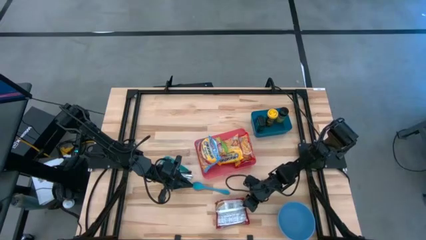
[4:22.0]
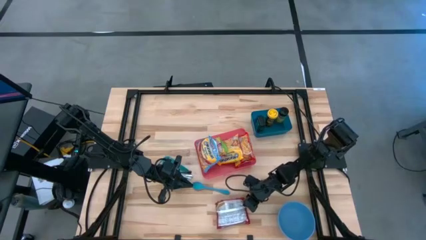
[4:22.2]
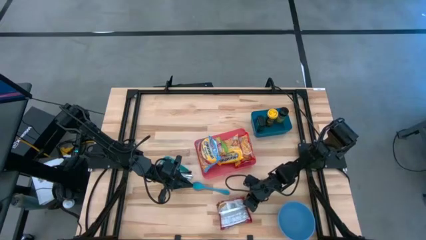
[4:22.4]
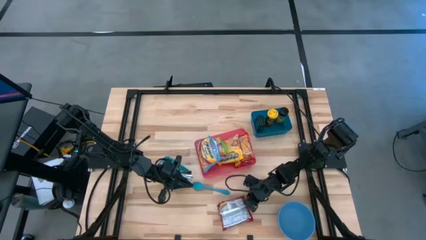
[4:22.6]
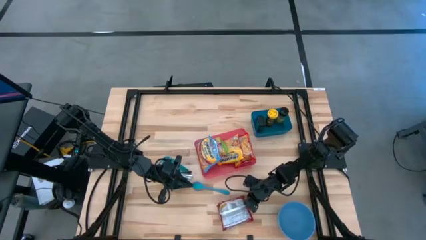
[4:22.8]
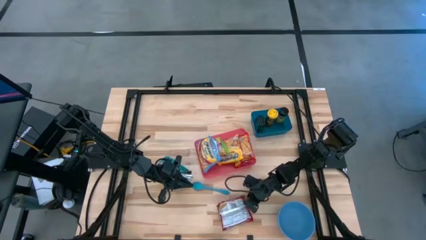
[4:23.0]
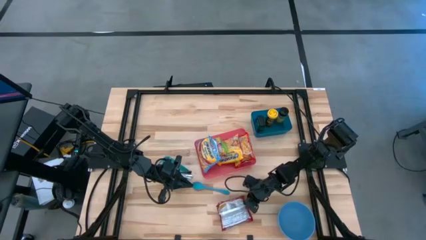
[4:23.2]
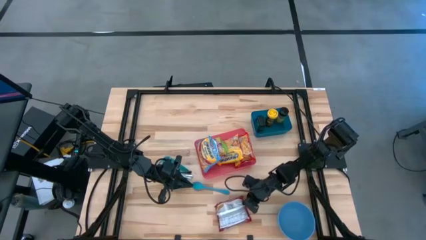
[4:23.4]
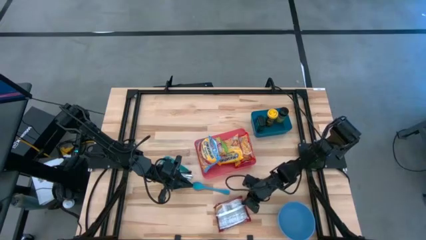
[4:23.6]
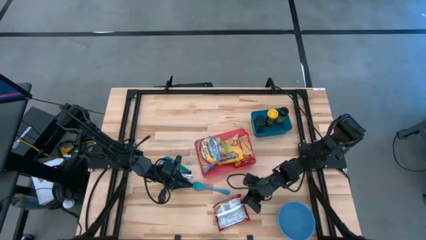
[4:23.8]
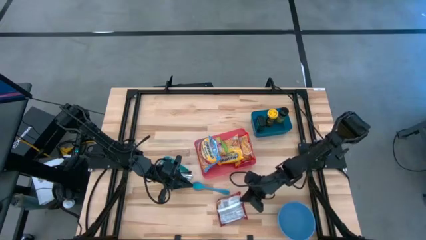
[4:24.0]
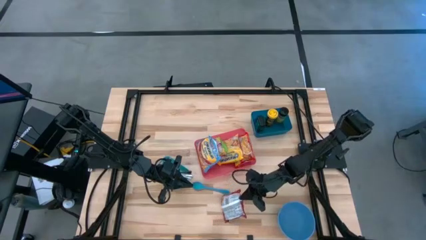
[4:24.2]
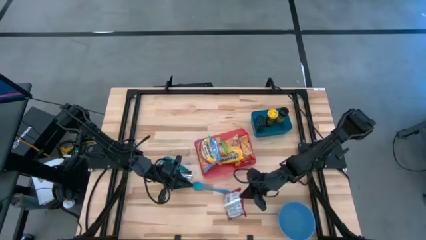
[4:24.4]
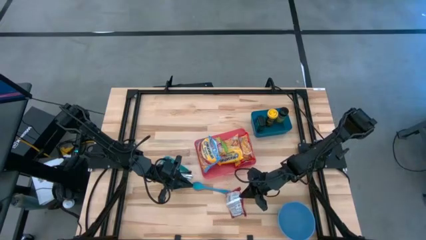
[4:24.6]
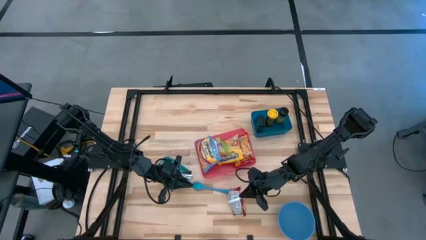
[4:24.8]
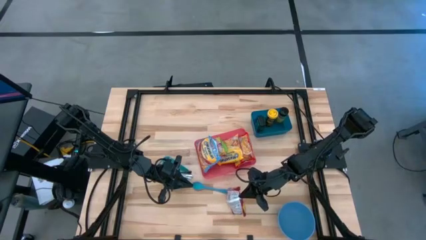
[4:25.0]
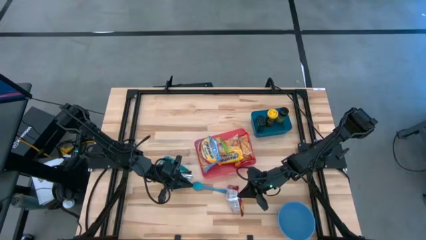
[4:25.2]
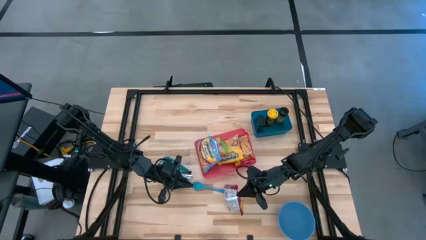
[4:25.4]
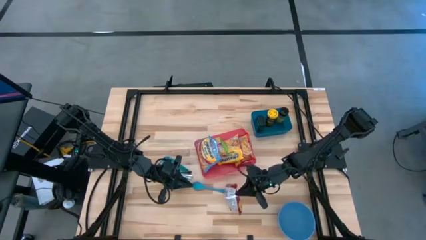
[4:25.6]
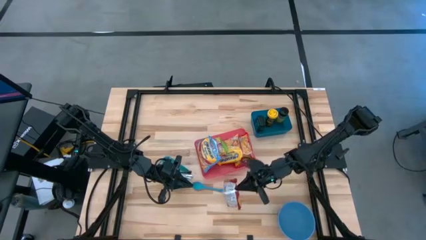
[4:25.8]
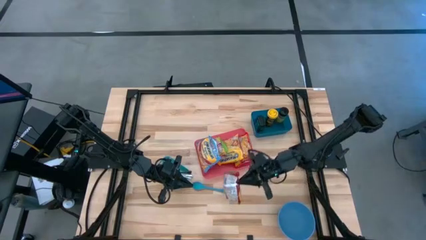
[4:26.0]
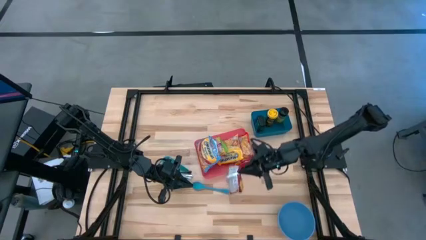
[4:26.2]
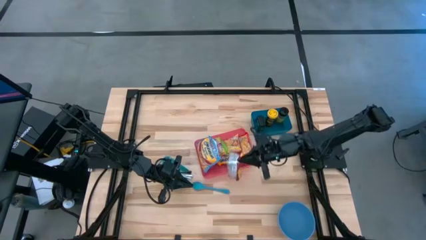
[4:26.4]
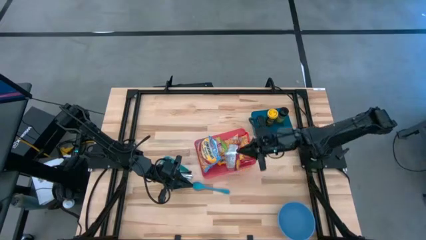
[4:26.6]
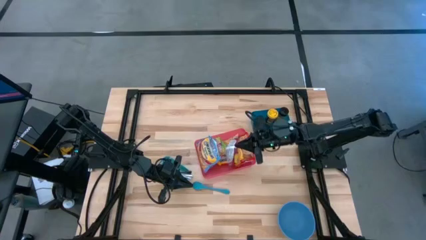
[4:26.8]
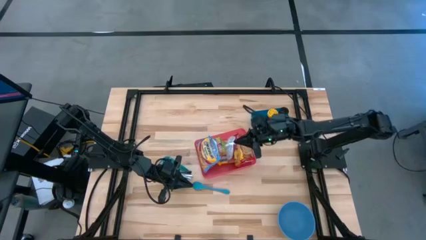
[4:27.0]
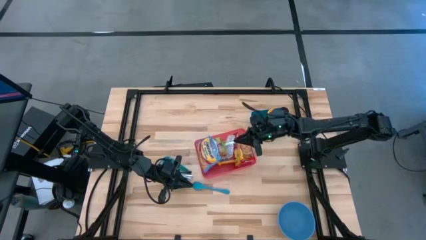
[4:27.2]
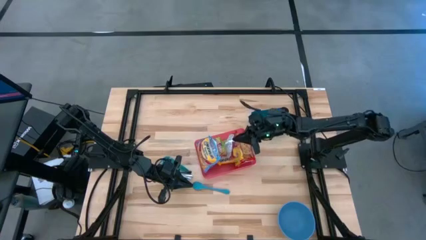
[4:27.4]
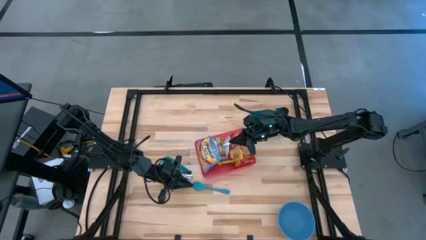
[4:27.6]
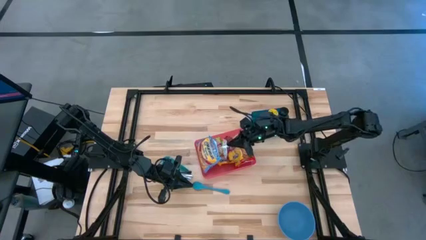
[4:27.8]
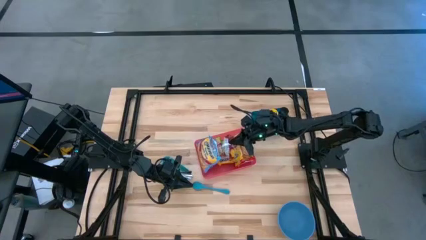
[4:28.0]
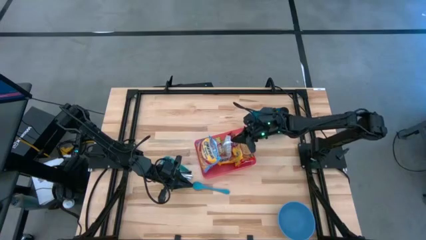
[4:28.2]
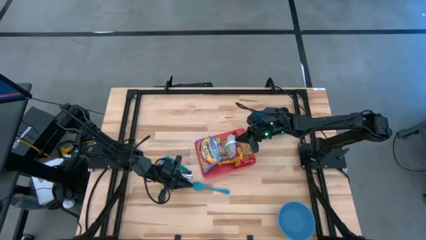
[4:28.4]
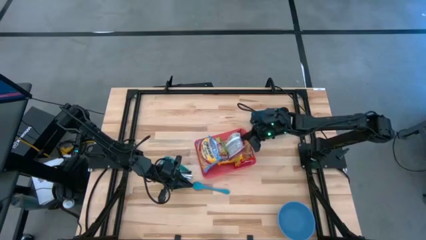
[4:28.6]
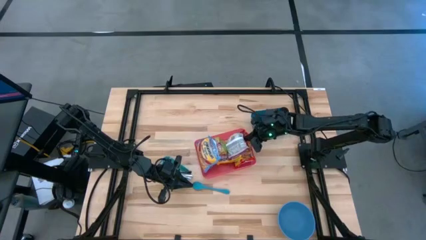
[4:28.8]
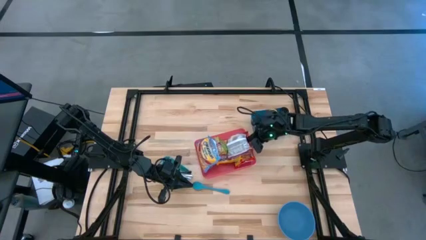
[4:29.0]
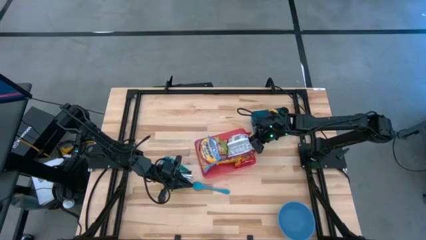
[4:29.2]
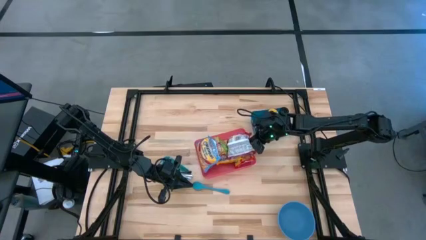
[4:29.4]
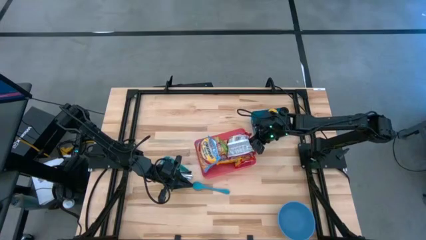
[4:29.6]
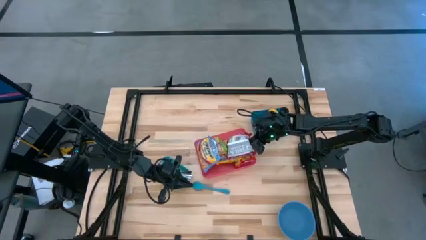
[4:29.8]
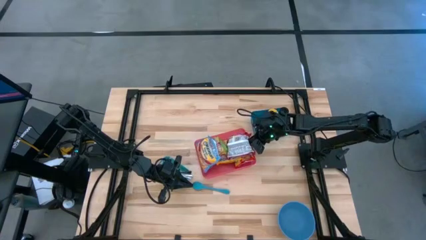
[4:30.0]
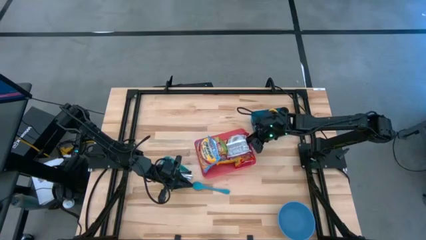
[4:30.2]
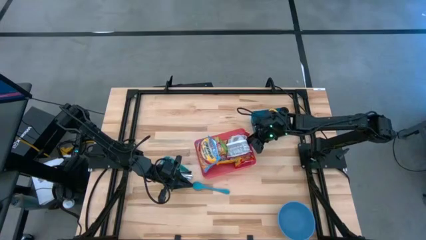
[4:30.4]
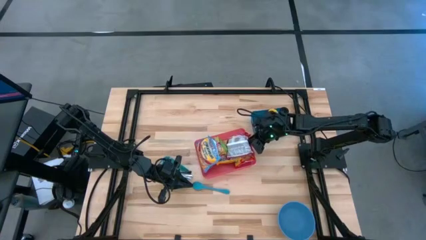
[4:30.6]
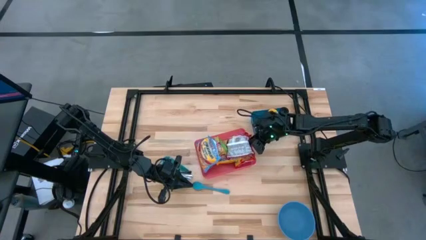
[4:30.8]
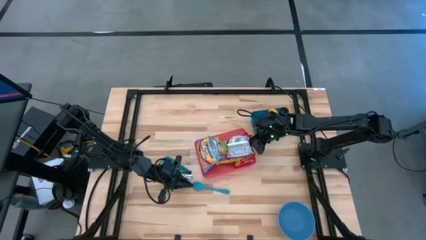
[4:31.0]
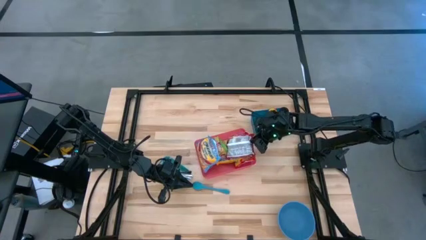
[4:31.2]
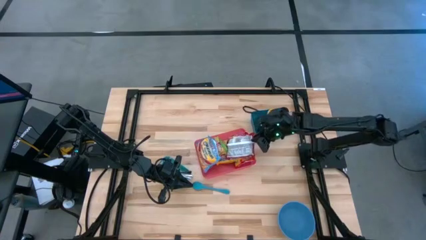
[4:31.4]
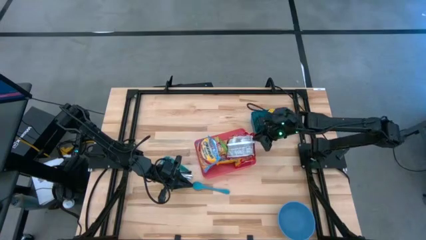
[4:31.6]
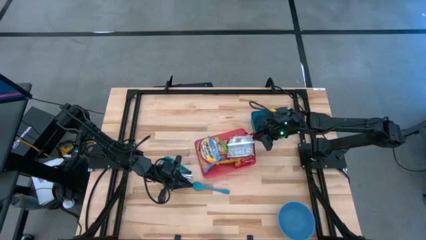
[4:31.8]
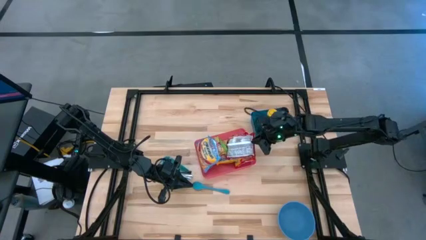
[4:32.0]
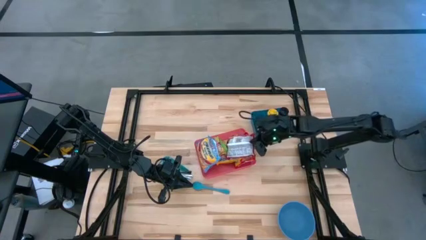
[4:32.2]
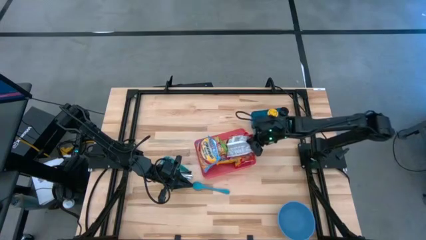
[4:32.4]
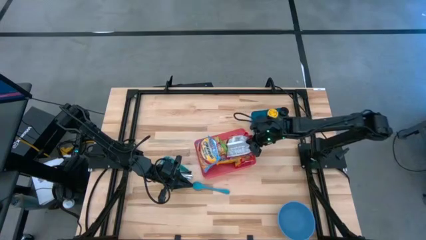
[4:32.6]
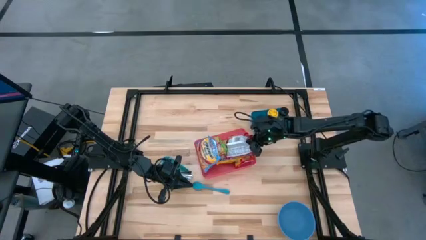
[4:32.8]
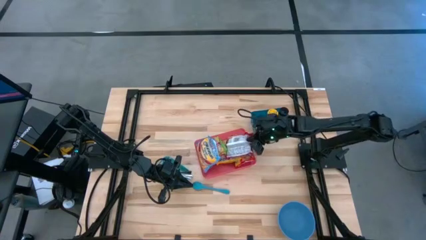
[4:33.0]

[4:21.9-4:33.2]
Task: Pick & Place Food Item
Put the red noodle pack into the red bin

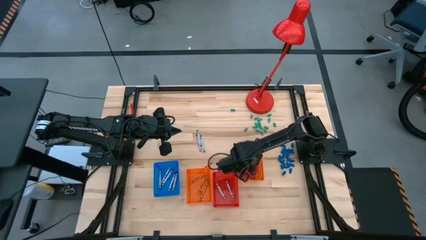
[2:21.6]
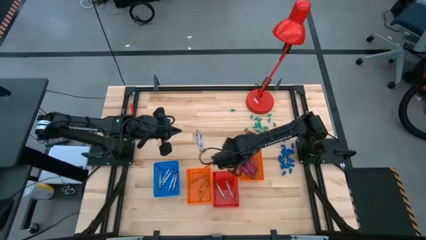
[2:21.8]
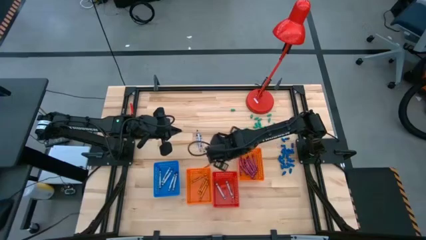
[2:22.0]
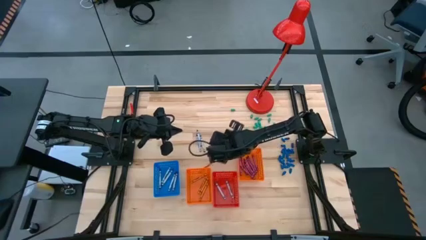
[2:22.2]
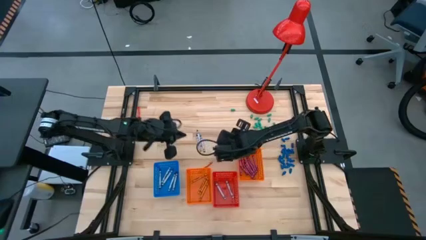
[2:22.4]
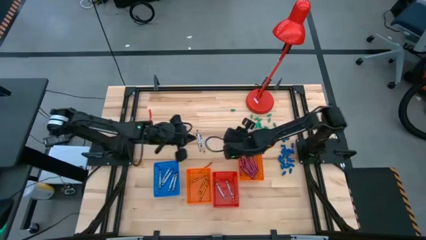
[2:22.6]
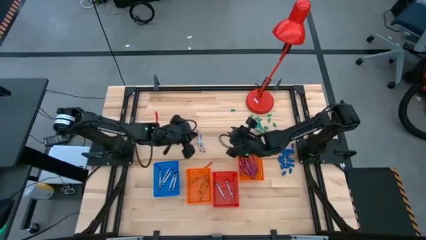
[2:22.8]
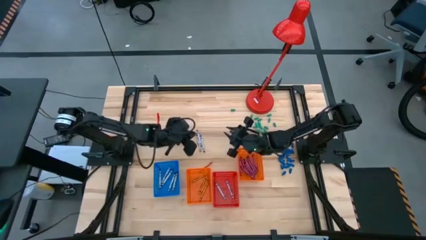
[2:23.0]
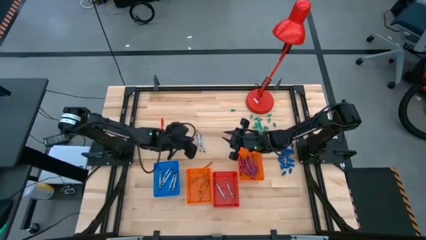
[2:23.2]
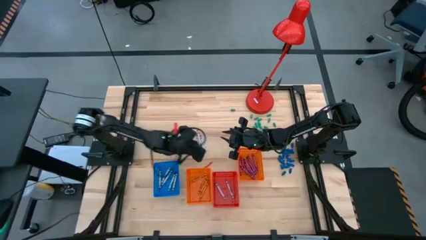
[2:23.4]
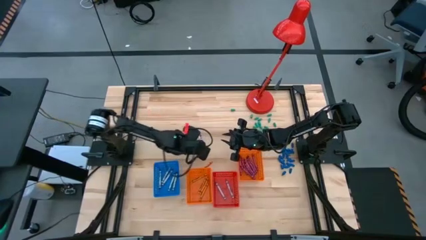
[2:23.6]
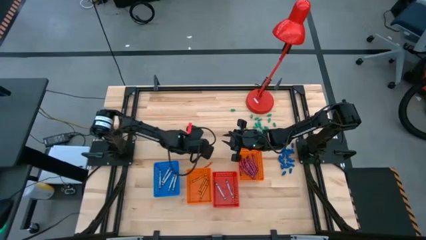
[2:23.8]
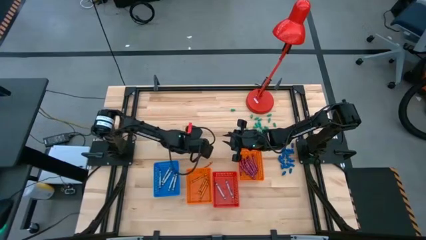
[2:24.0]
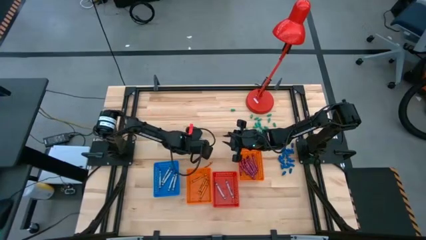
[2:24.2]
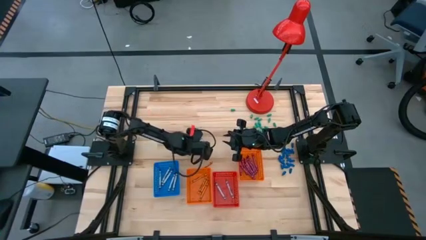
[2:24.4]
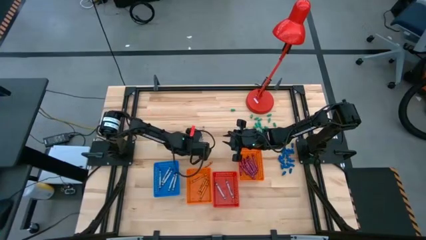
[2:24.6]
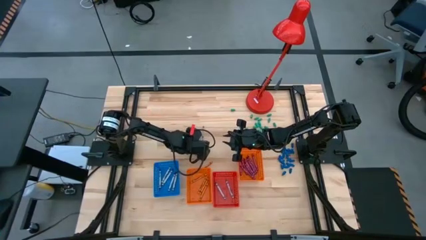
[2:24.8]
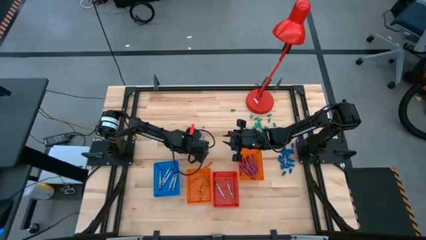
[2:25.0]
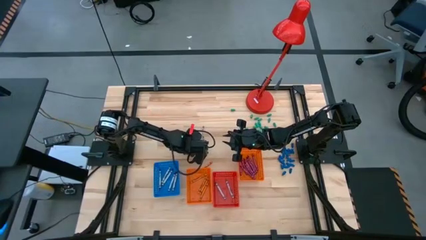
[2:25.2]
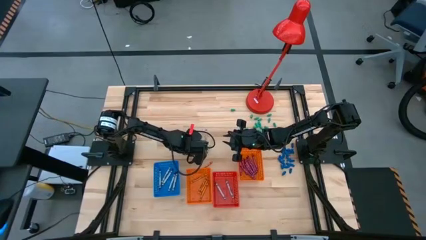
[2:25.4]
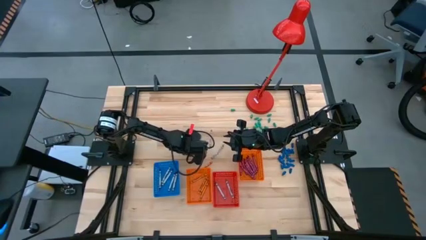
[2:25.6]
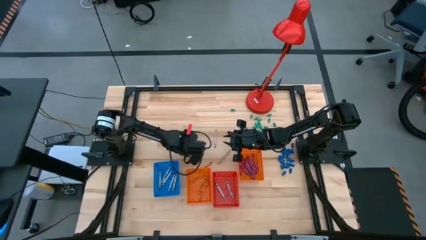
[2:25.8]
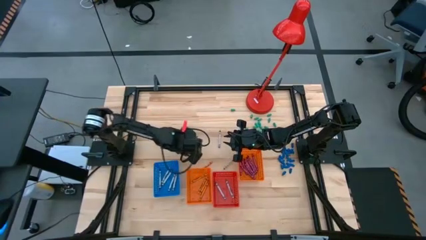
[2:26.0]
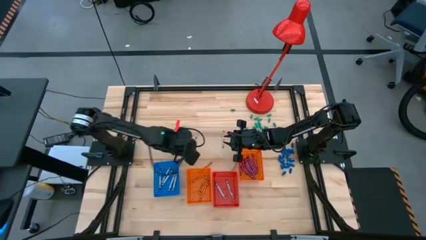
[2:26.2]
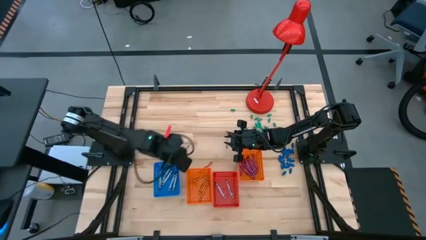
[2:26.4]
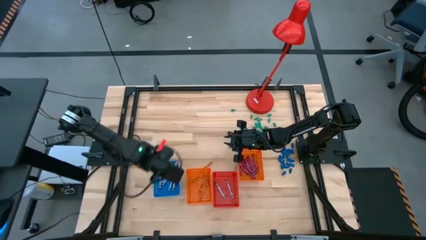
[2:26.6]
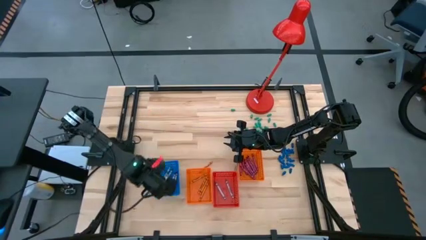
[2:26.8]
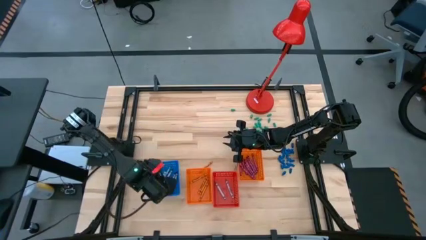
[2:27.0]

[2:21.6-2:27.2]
Task: Sort crayons
Put the black crayon into the blue bin
